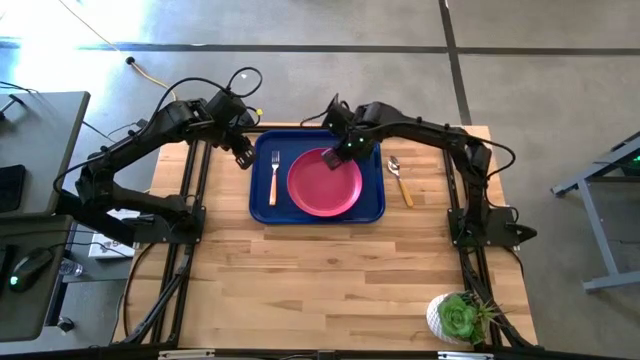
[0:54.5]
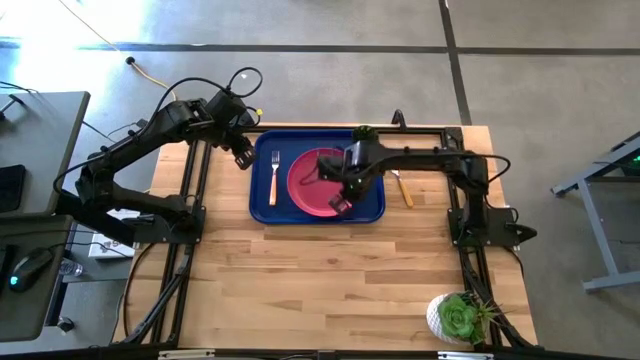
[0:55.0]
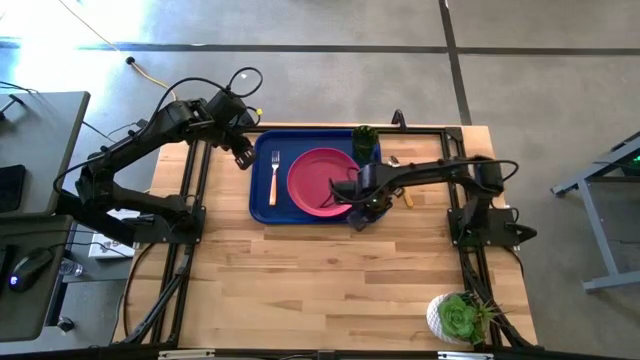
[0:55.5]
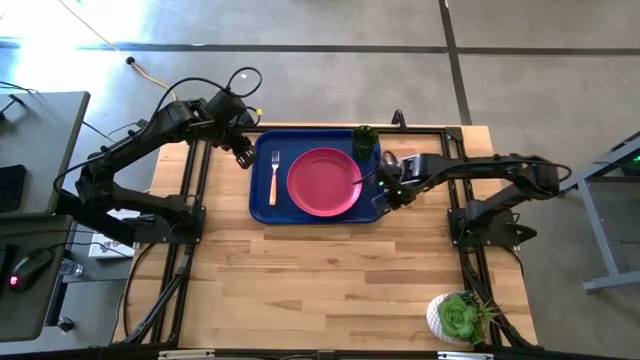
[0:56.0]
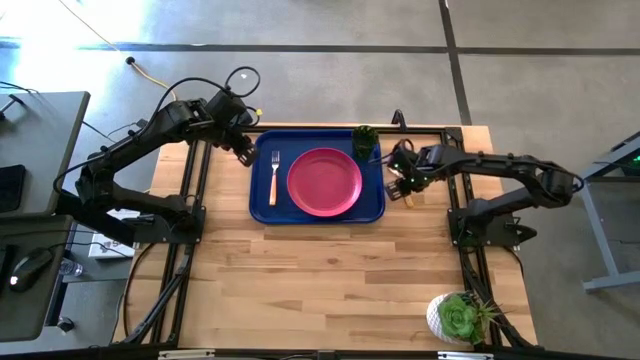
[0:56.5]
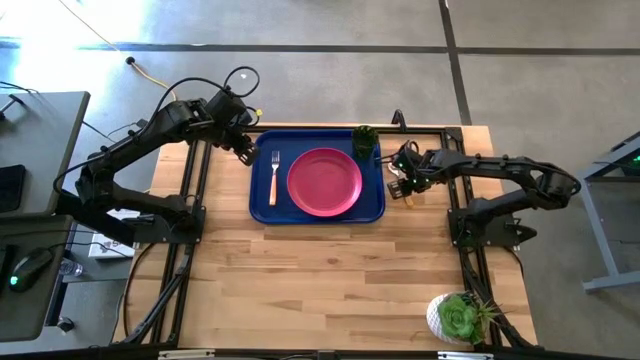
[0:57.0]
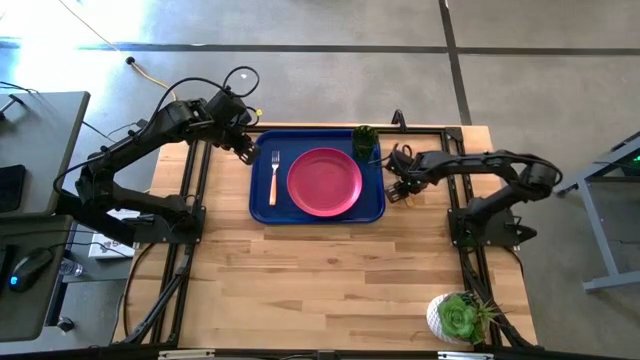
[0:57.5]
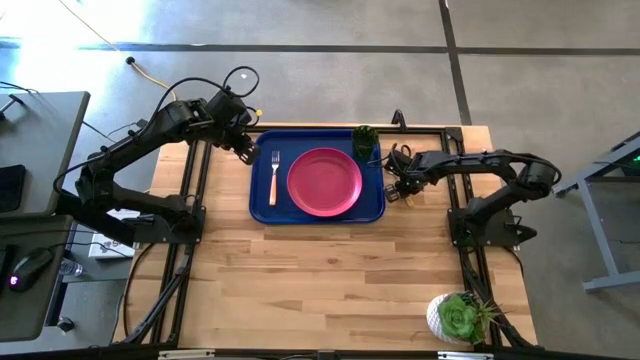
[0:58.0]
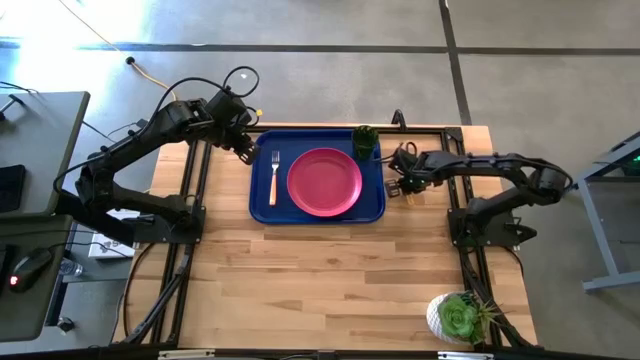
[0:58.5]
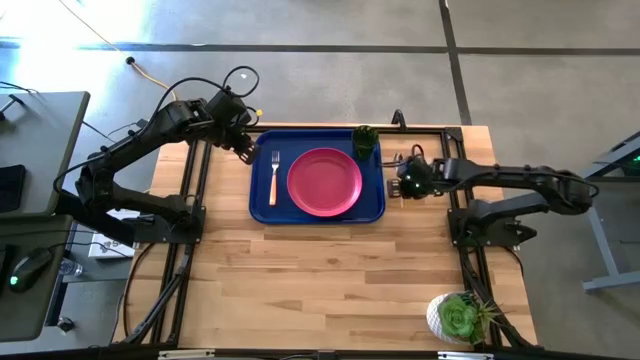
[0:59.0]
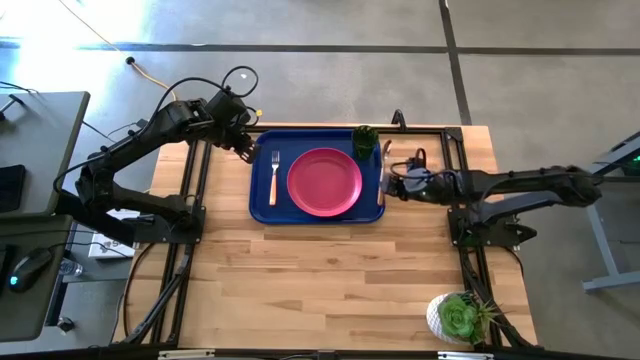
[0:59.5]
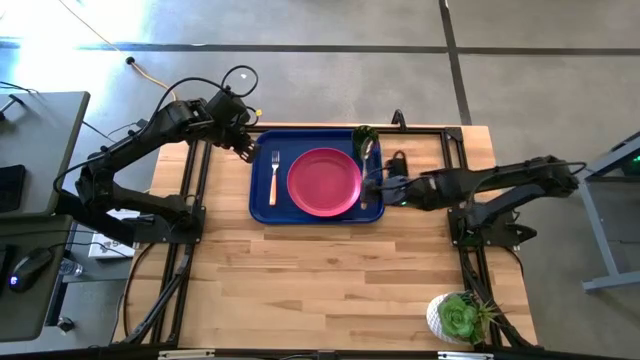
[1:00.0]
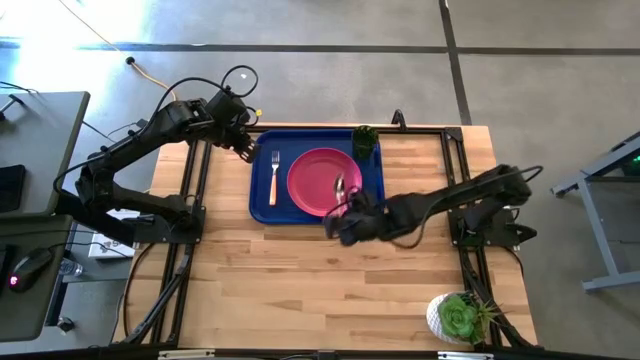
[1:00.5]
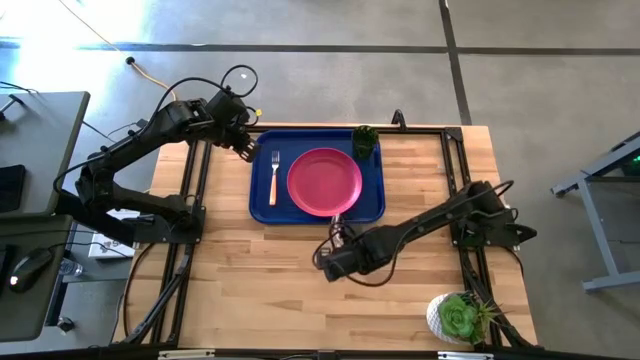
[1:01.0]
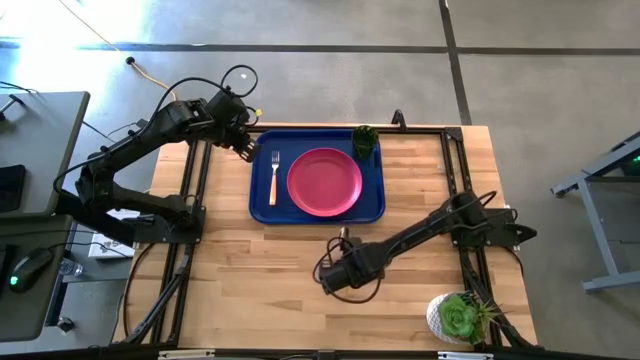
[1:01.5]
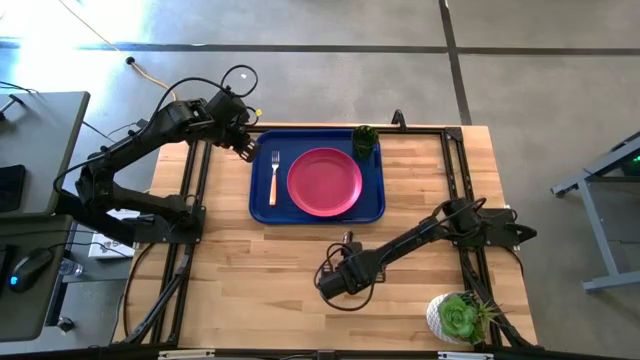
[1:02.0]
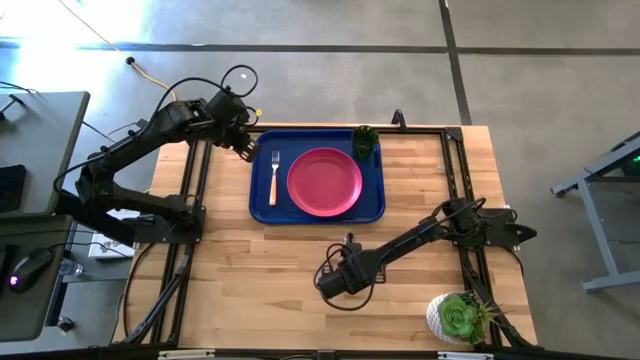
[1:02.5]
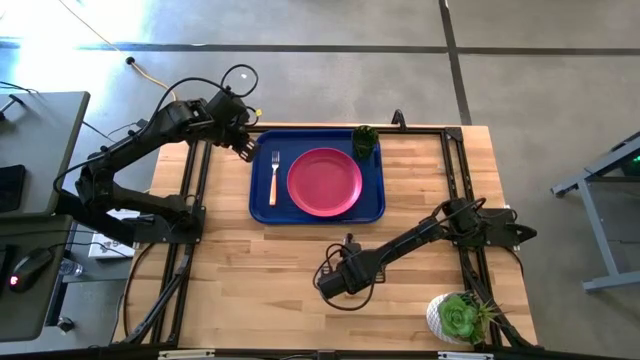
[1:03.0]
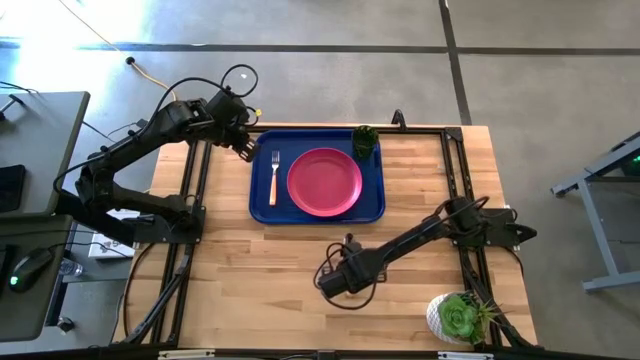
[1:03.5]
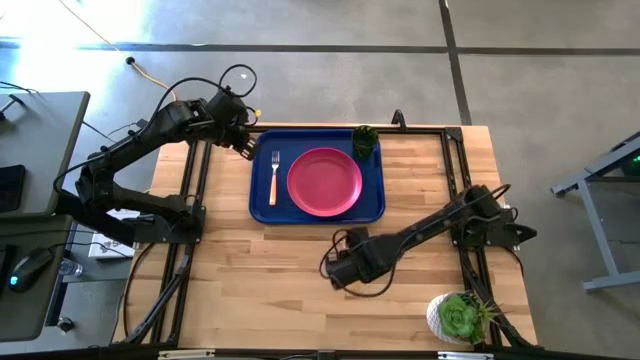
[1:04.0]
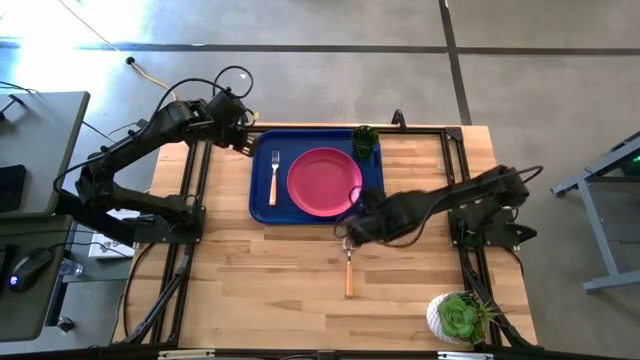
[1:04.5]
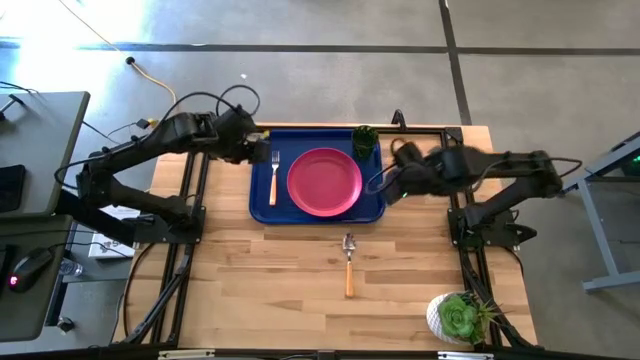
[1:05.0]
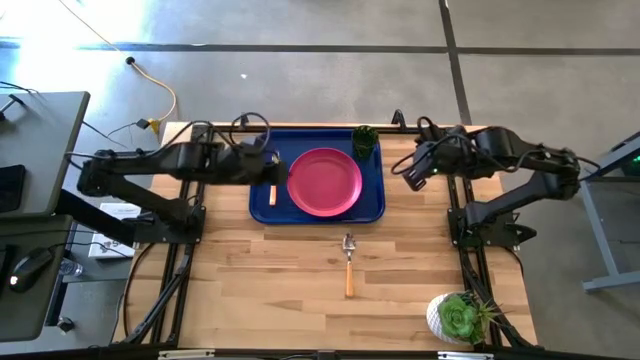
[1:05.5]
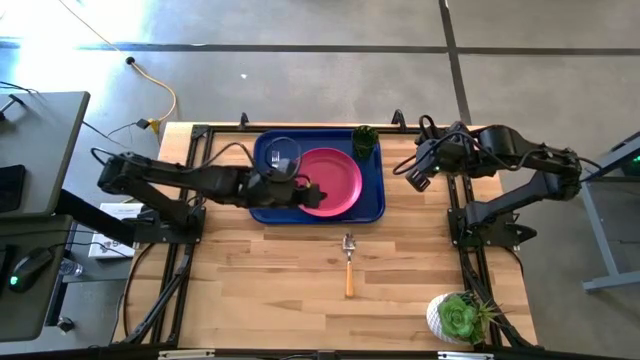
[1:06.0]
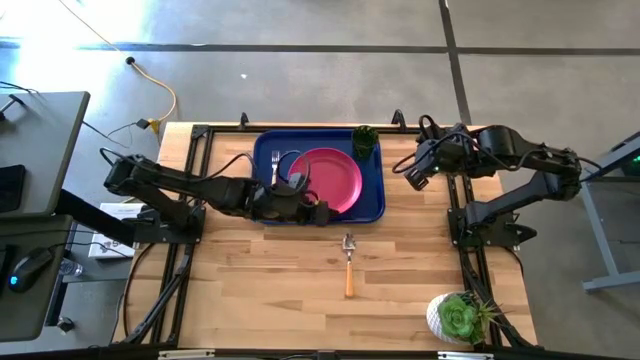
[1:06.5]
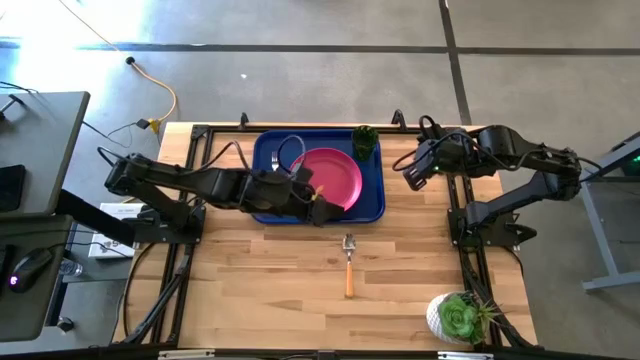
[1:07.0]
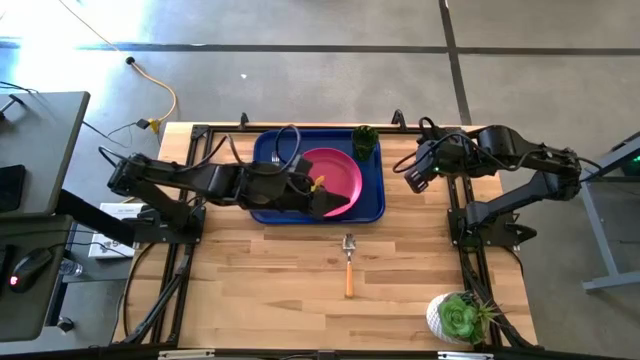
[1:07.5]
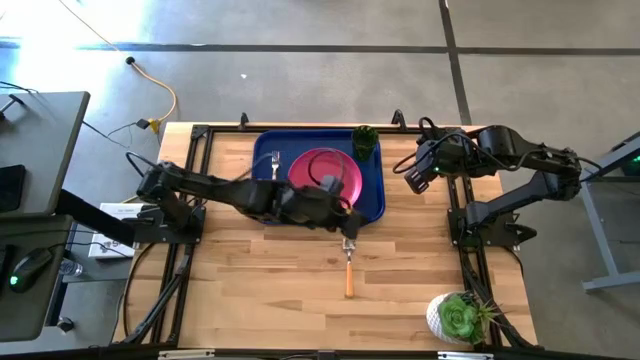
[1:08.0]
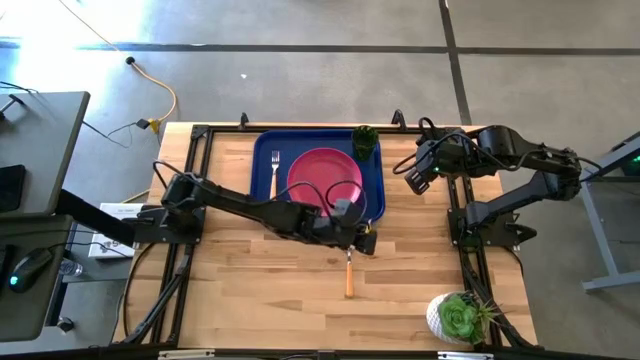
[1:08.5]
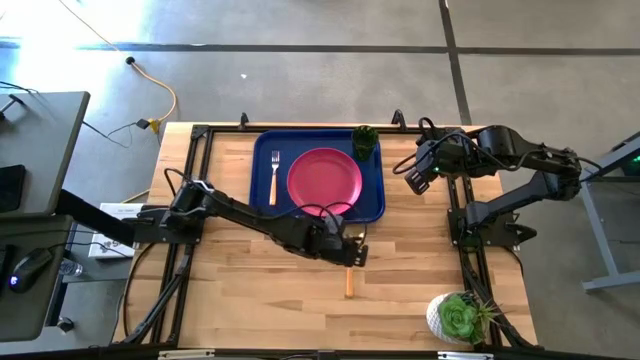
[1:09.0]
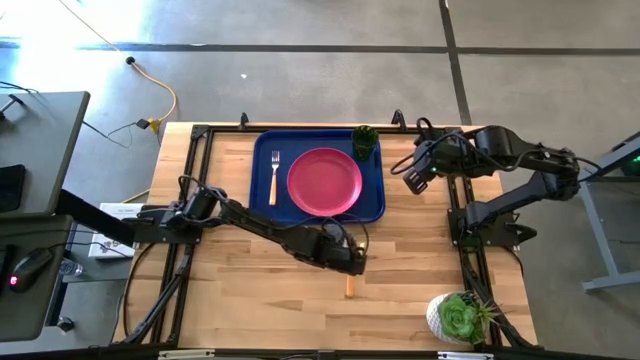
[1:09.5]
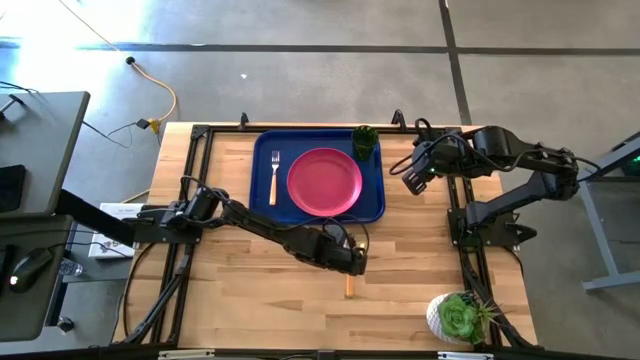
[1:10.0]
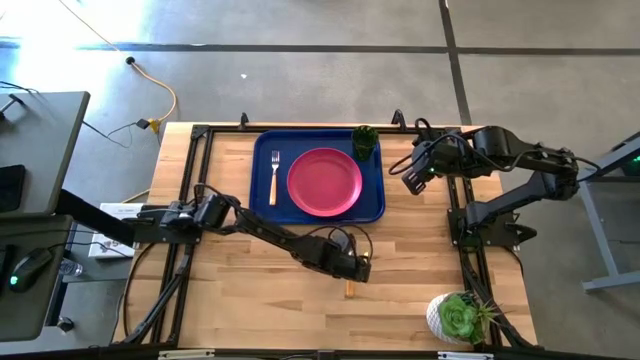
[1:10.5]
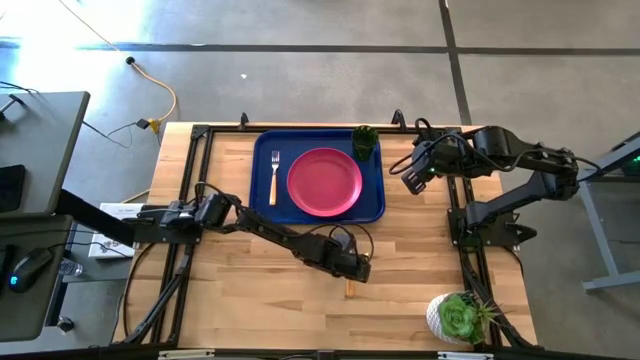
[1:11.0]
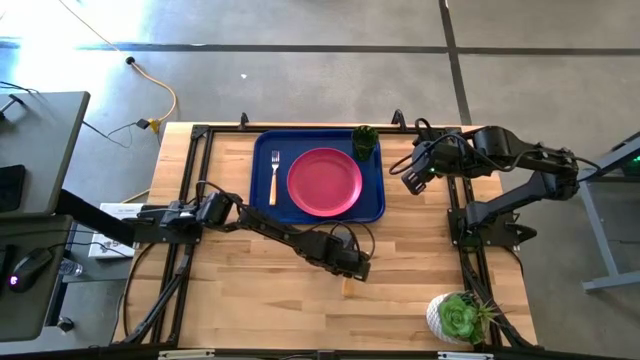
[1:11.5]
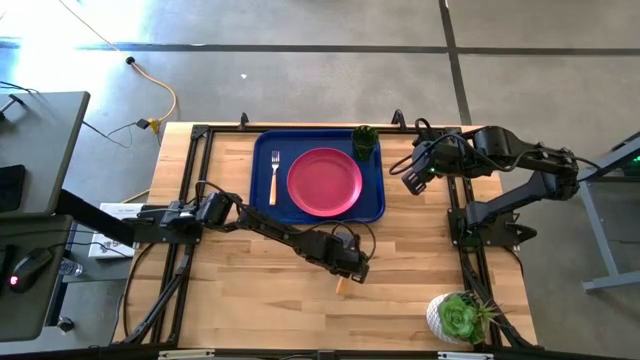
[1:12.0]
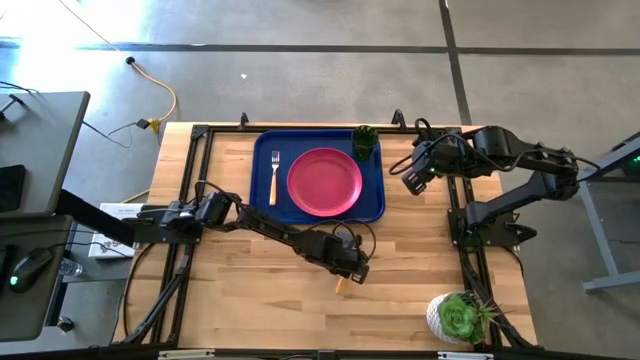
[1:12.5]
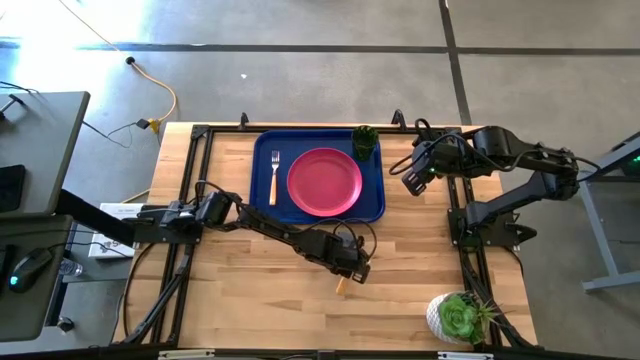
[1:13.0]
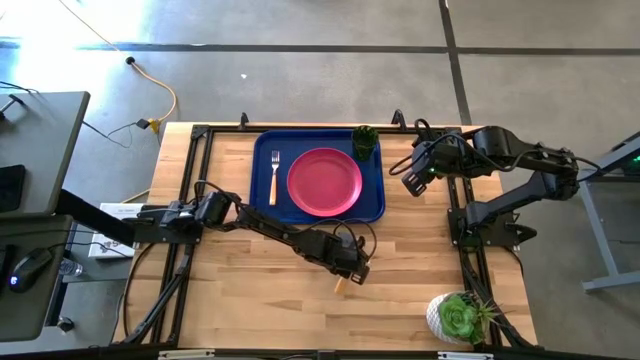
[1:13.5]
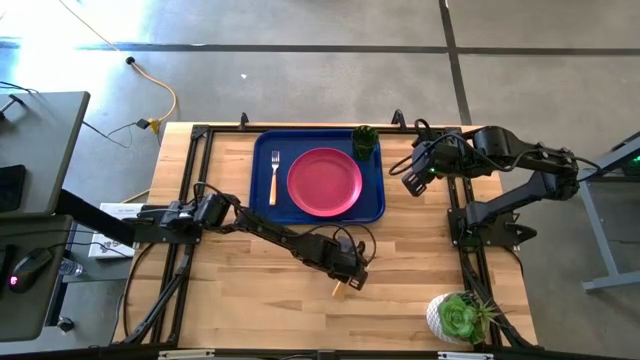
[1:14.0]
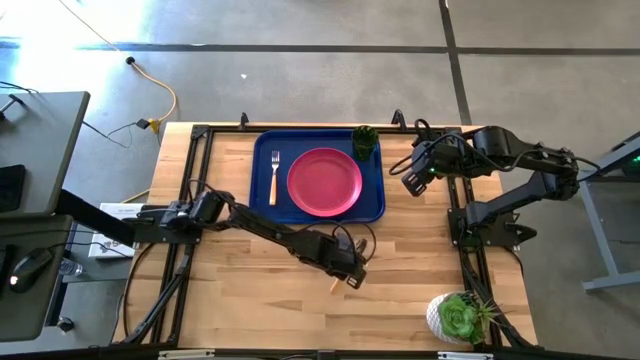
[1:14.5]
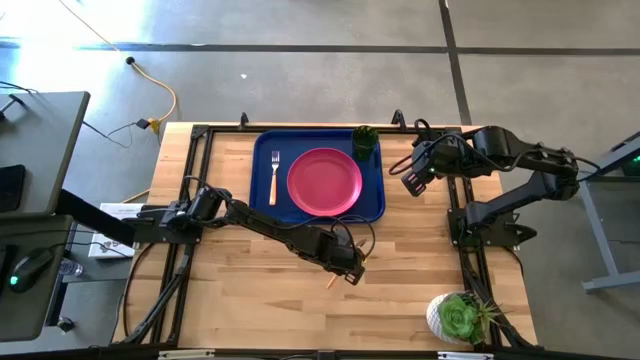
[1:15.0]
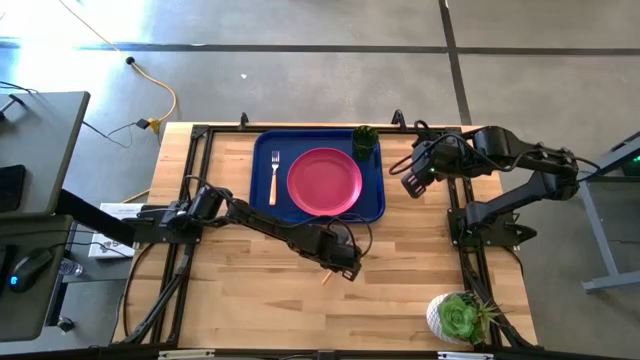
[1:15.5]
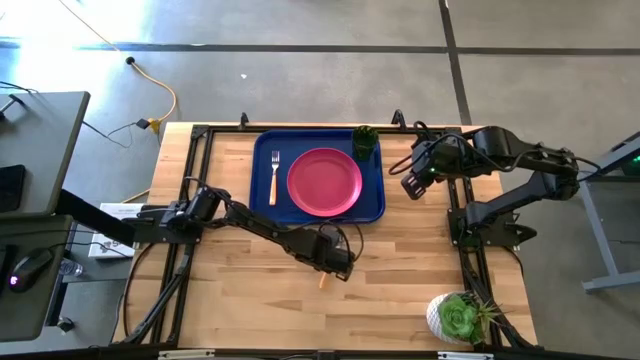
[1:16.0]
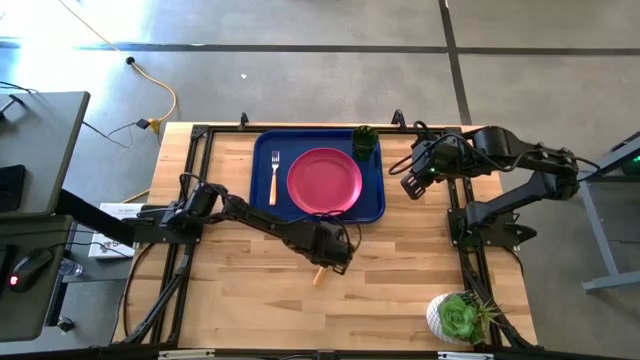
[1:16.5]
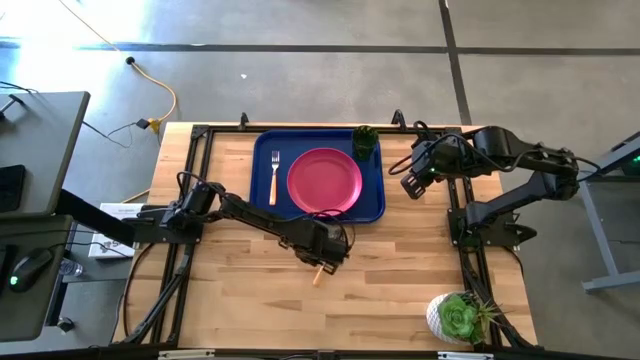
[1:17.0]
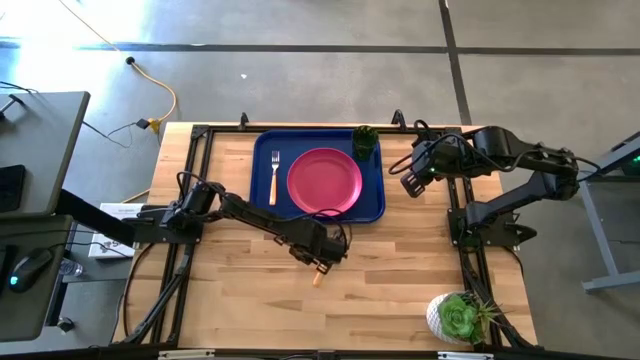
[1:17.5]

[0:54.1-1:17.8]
Task: Pick and place plate/cup/fork/spoon on tray
Put the orange spoon on the blue tray to the right of the orange fork
